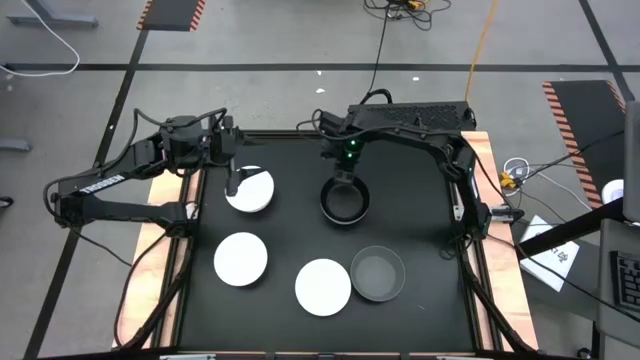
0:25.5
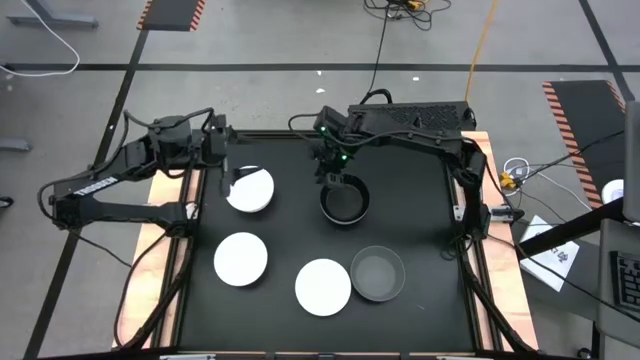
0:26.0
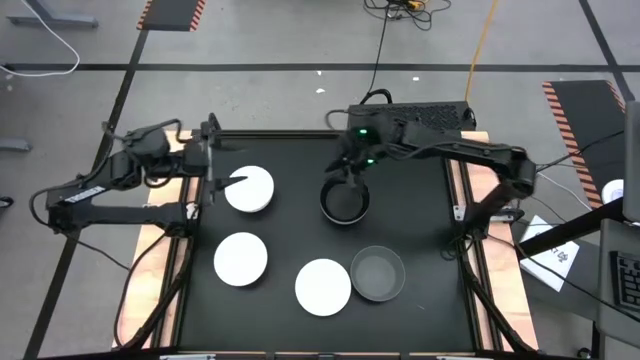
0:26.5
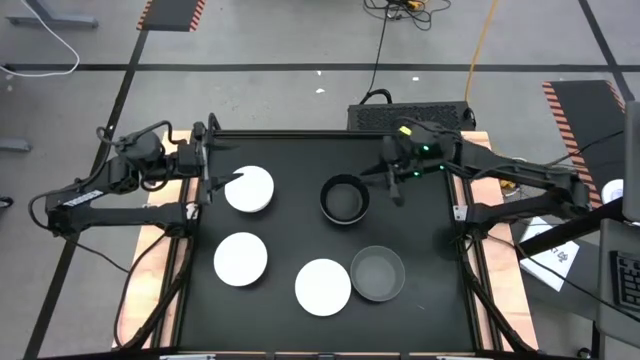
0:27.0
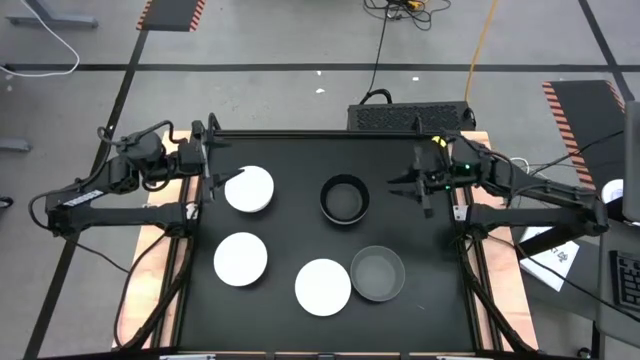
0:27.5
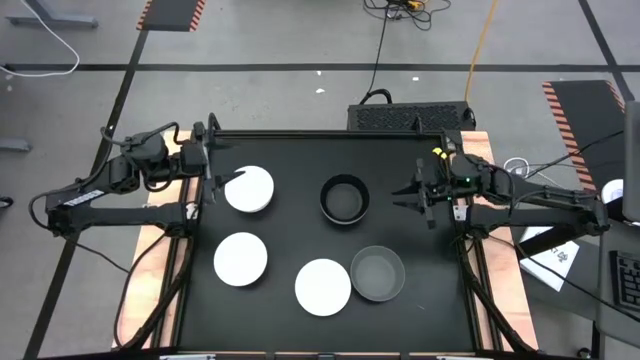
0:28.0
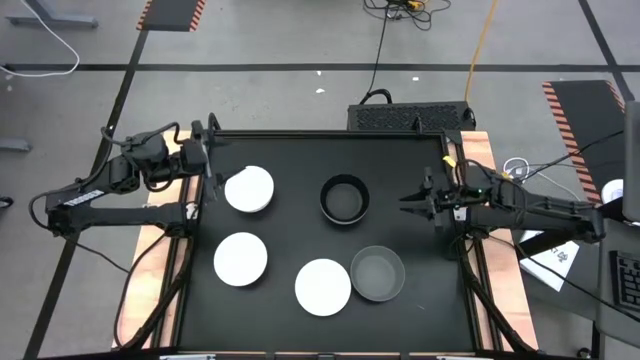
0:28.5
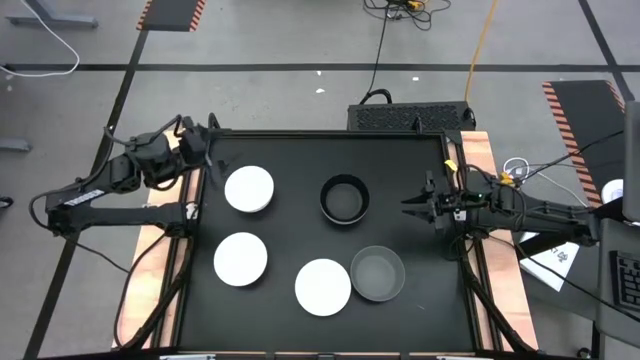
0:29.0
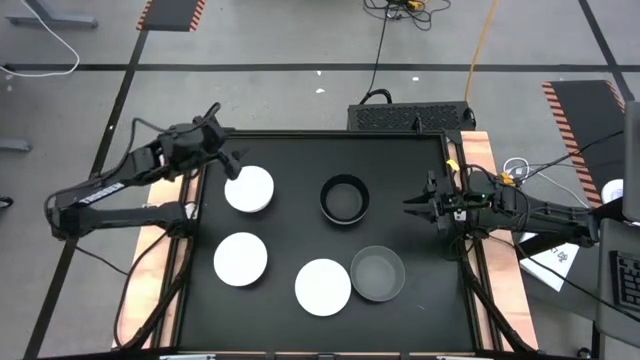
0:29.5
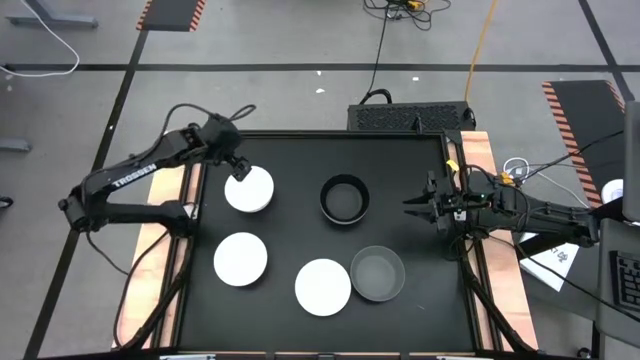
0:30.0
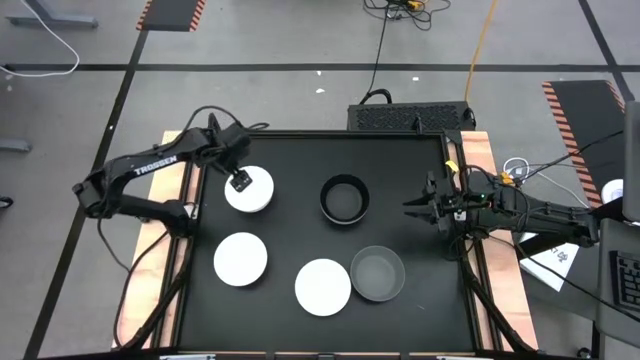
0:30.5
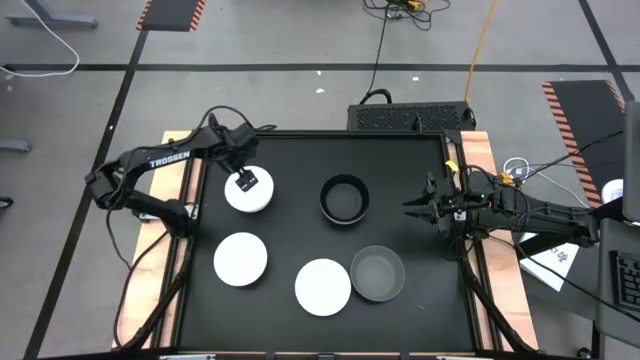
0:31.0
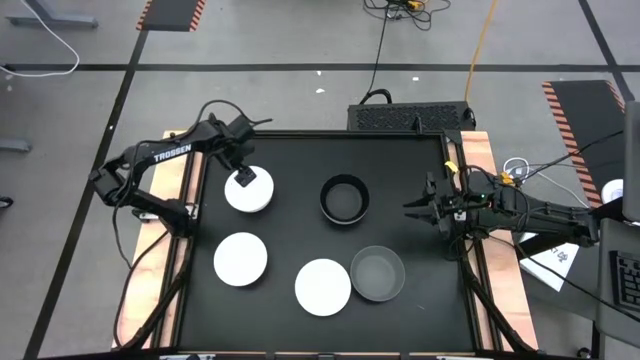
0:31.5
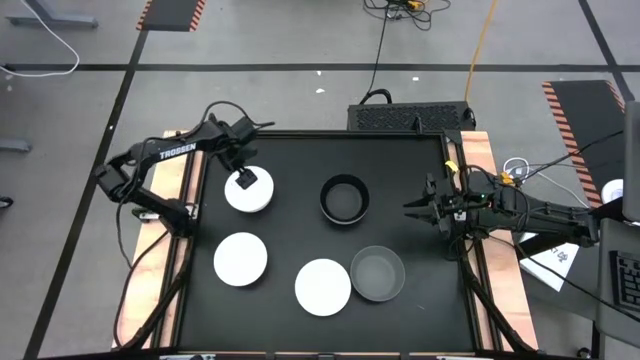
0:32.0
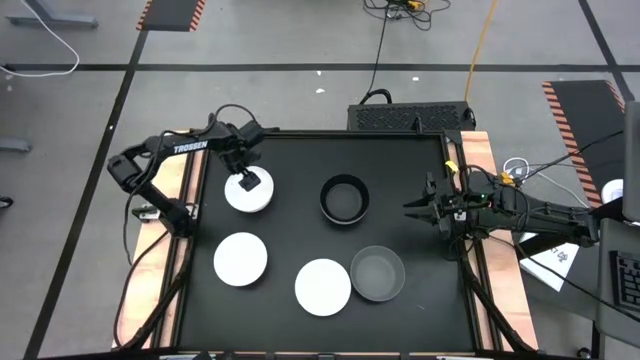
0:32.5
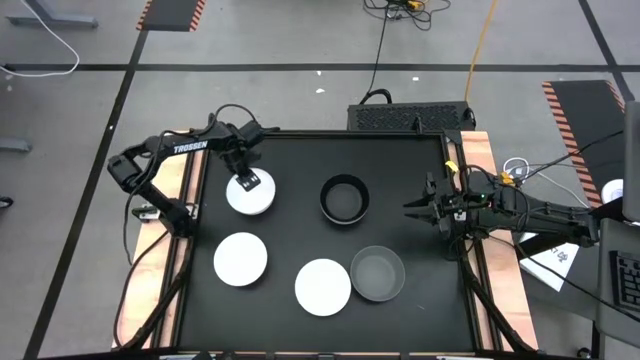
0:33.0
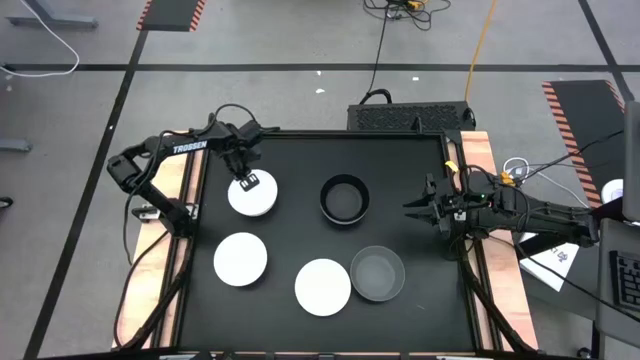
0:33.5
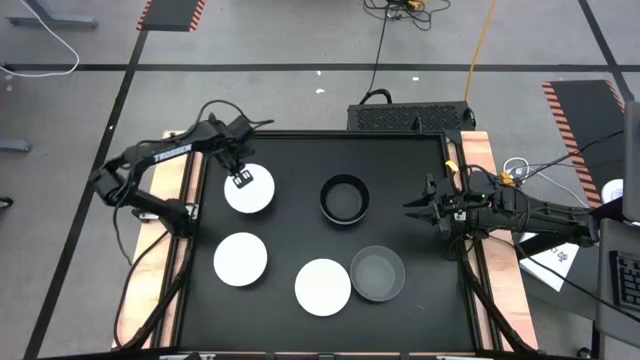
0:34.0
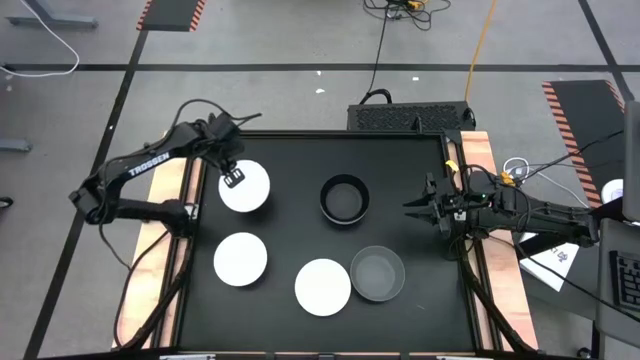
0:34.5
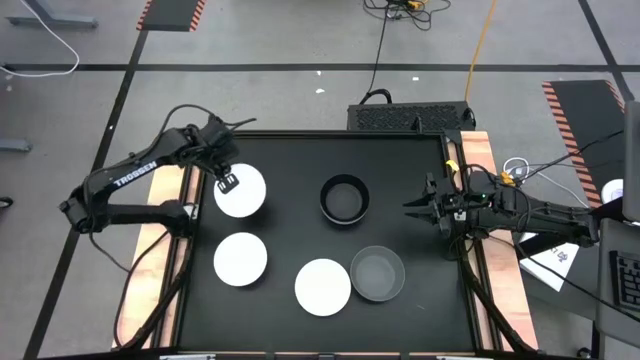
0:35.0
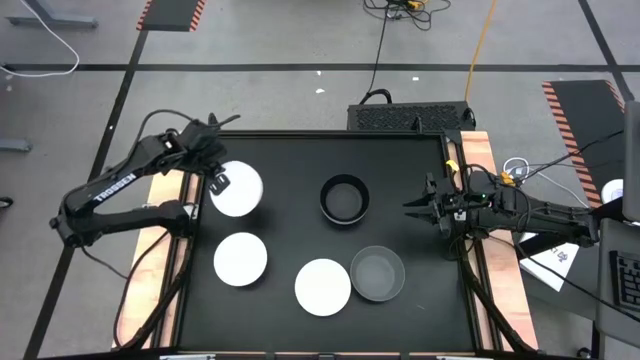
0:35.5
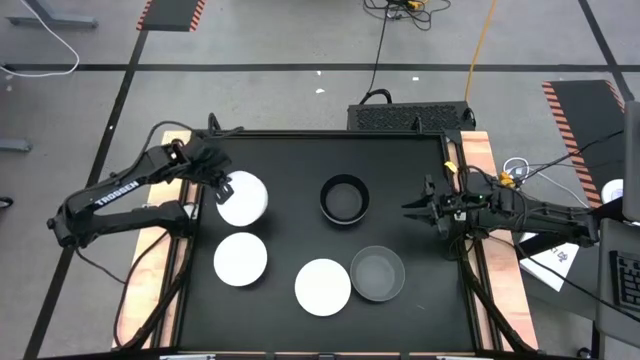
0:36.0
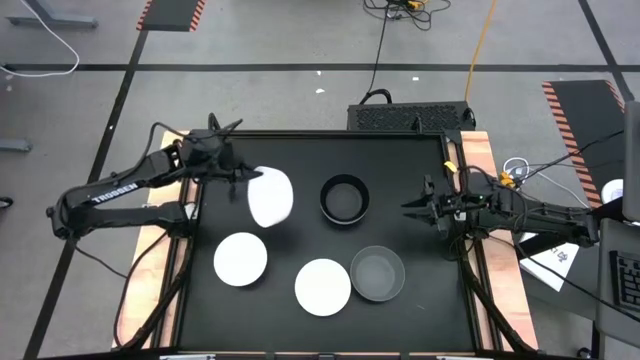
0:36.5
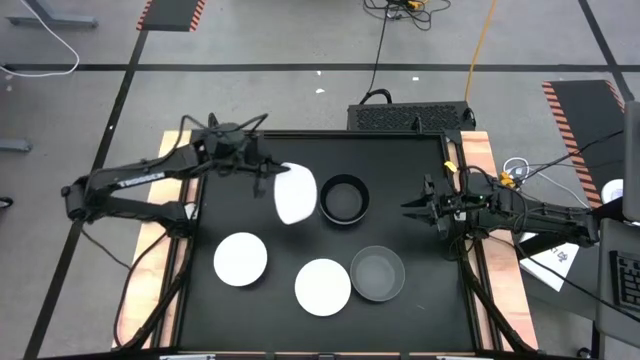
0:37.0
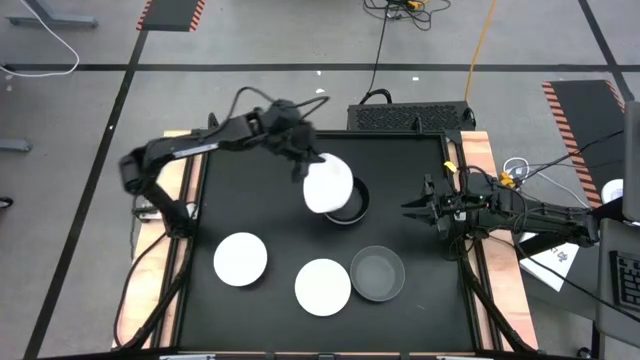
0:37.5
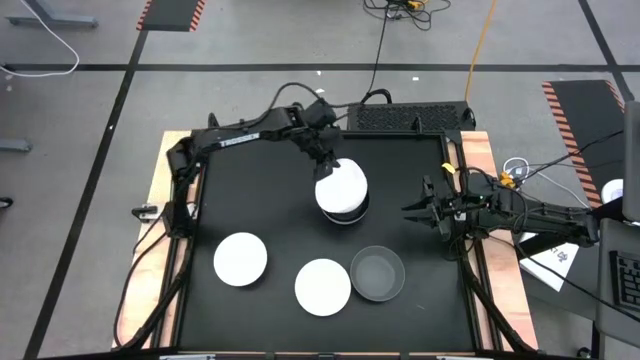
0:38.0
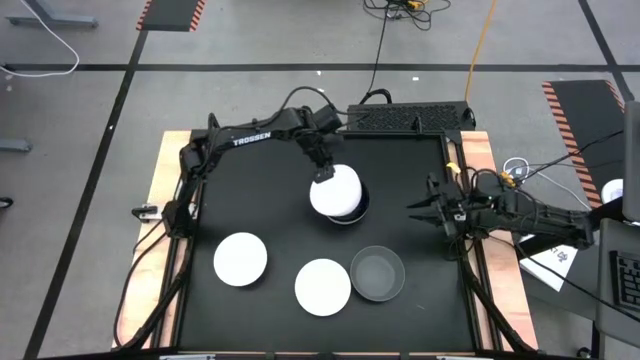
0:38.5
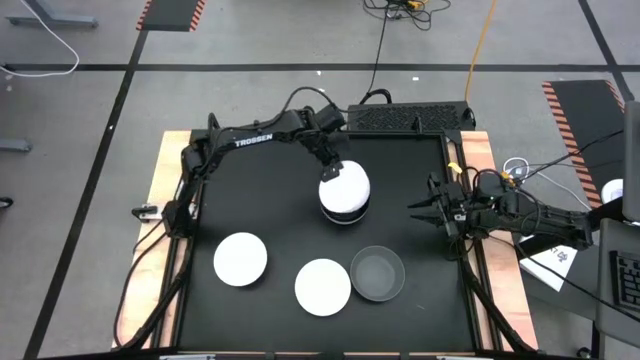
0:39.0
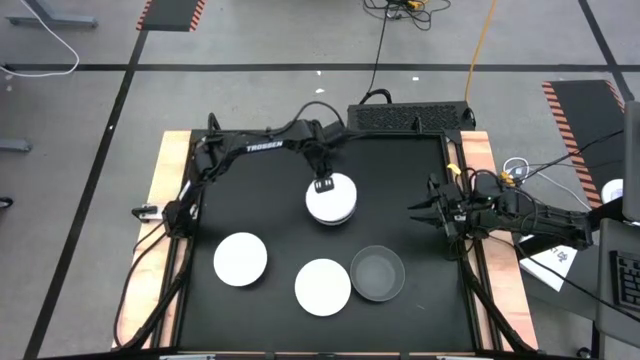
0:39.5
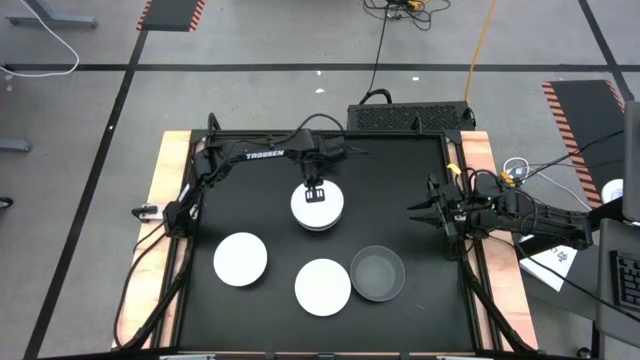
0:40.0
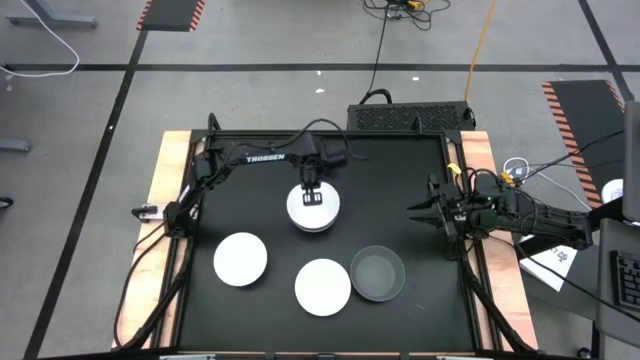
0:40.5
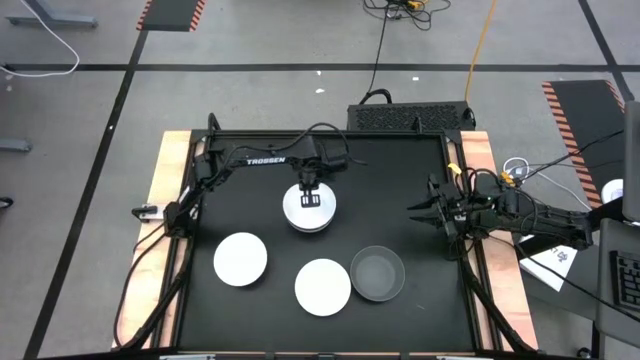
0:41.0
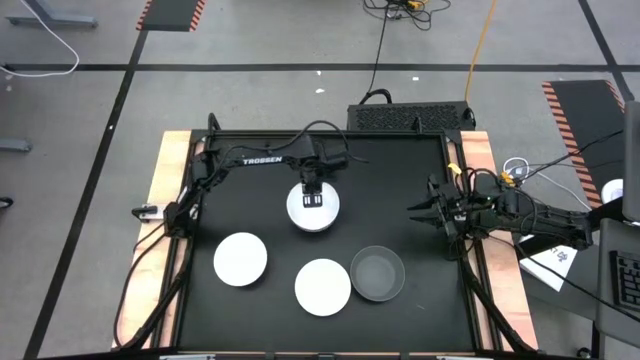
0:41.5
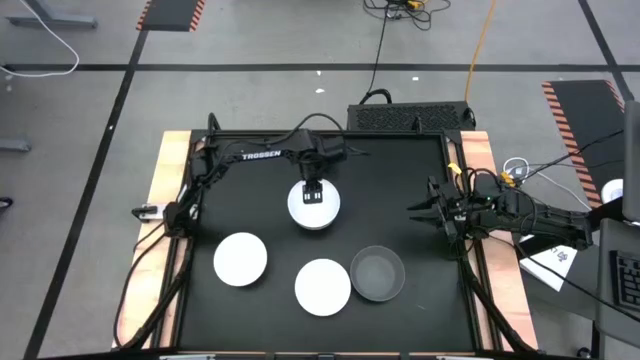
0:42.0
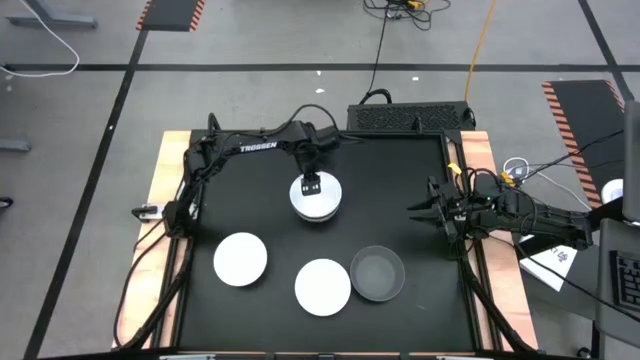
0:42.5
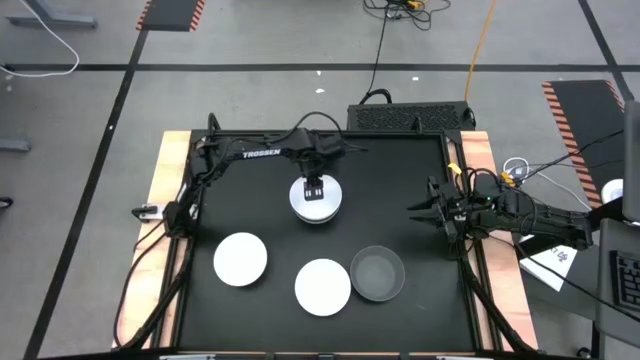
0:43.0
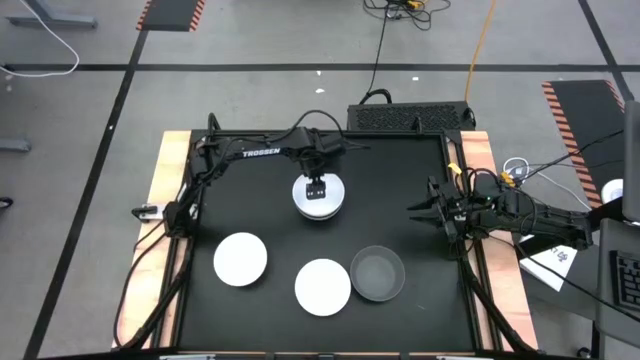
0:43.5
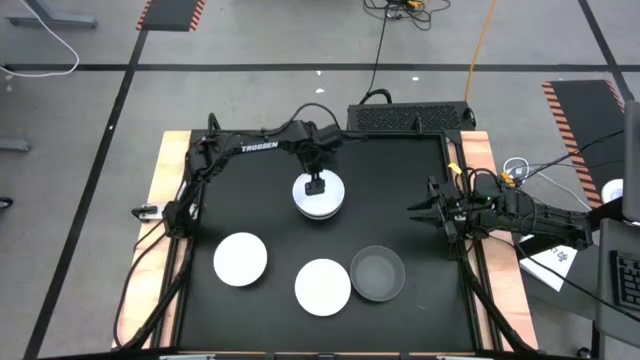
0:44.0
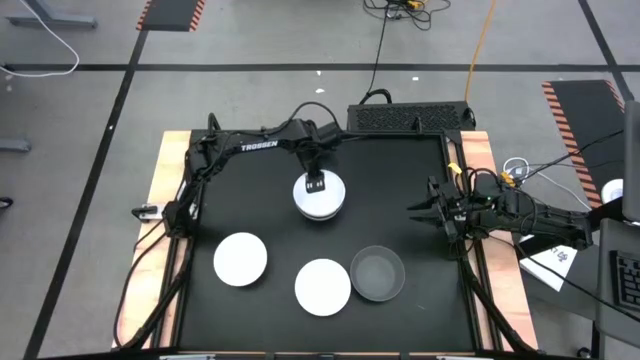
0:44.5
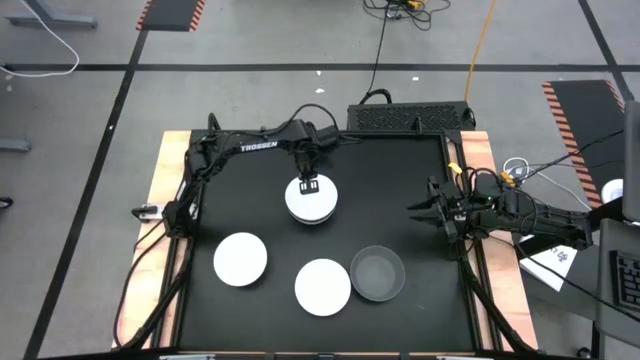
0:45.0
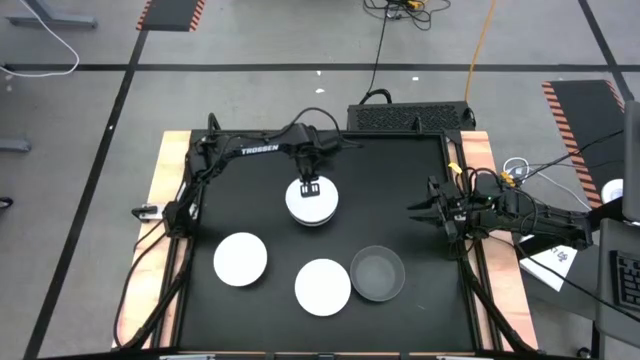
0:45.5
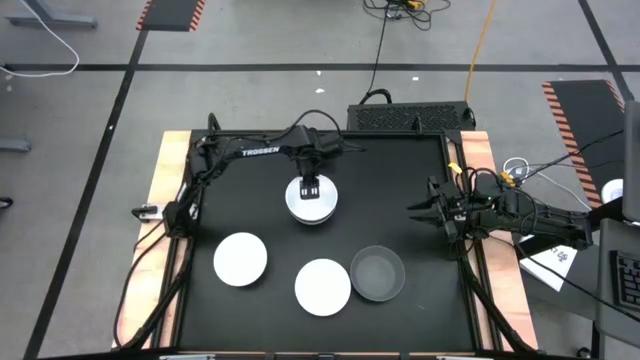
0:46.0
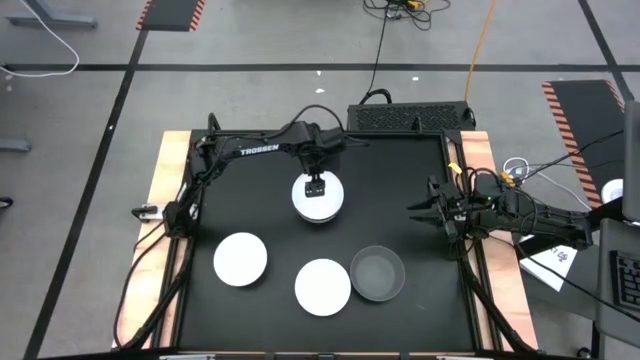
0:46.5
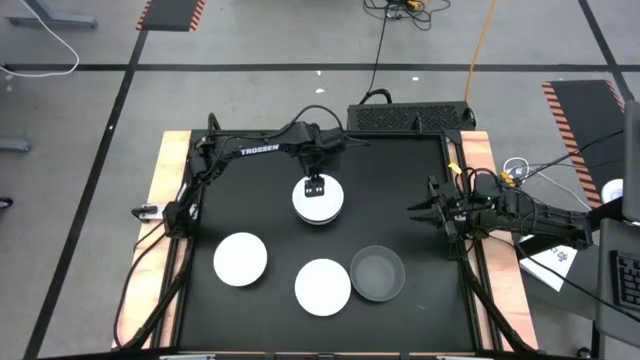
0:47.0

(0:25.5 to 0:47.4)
Task: Nest bowls inside each other
Stack the top left white bowl on the black bowl
